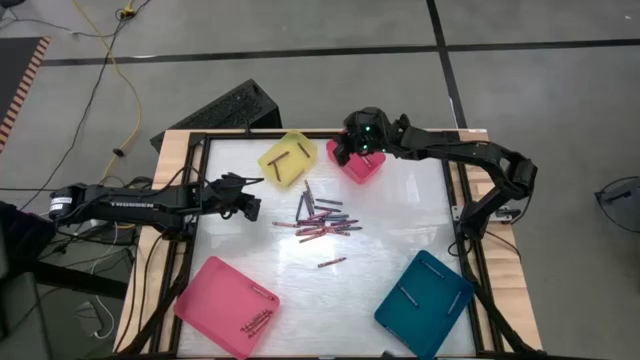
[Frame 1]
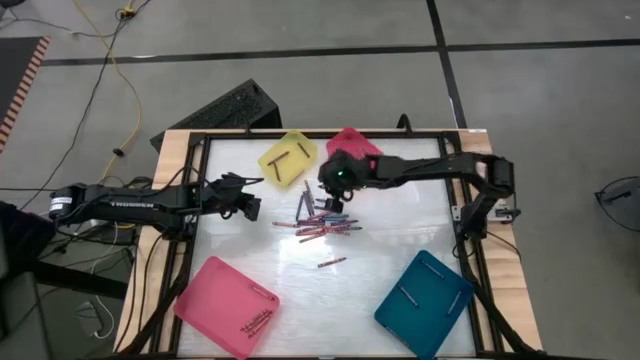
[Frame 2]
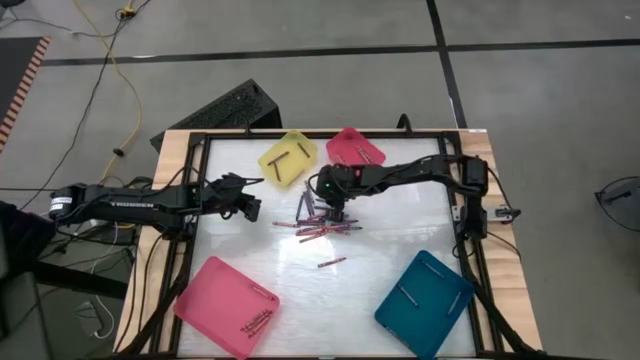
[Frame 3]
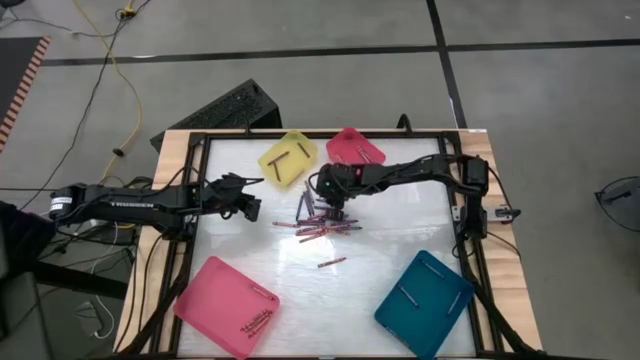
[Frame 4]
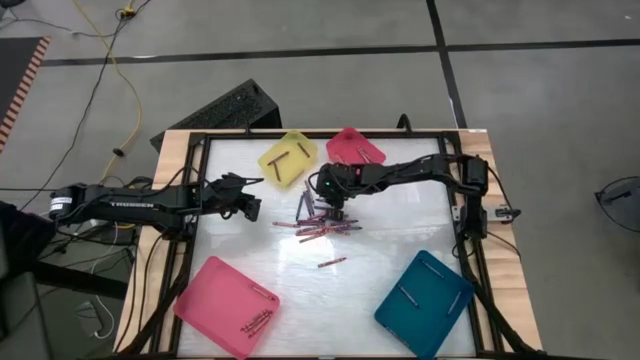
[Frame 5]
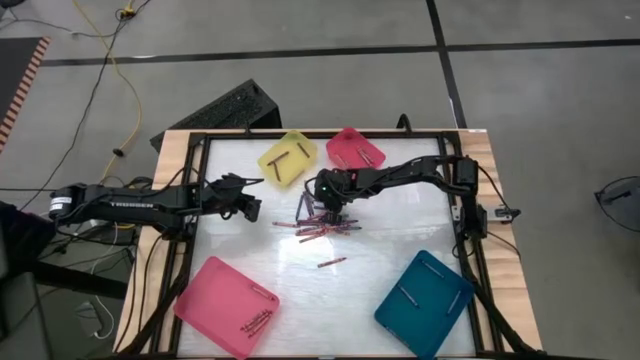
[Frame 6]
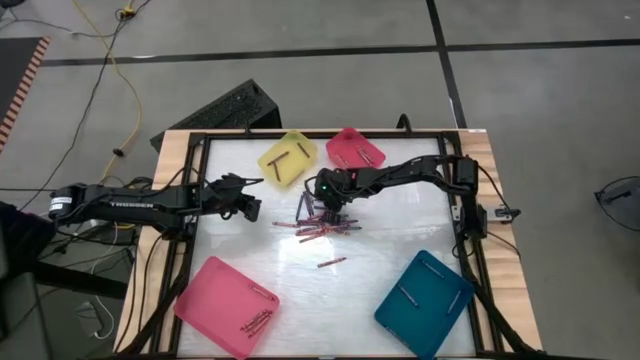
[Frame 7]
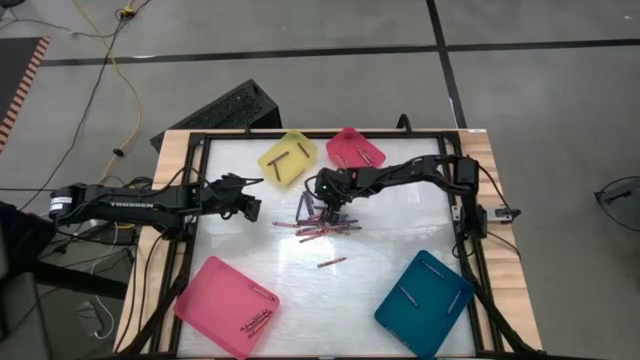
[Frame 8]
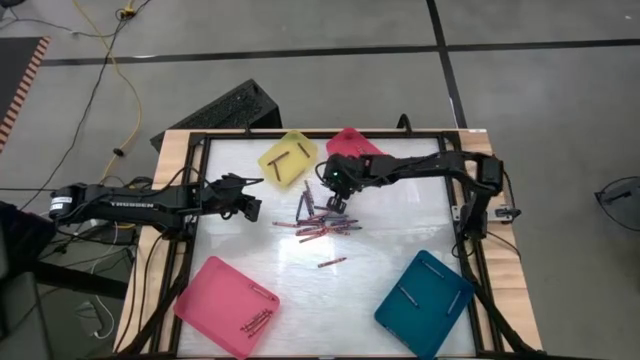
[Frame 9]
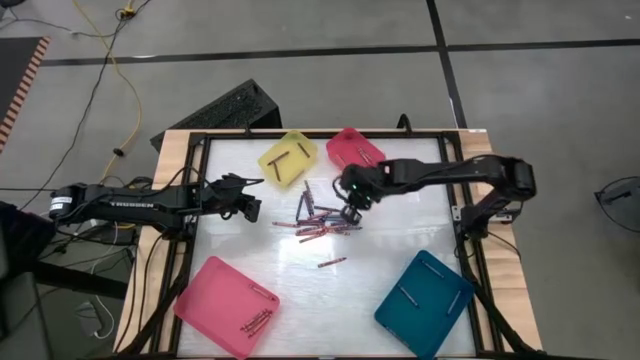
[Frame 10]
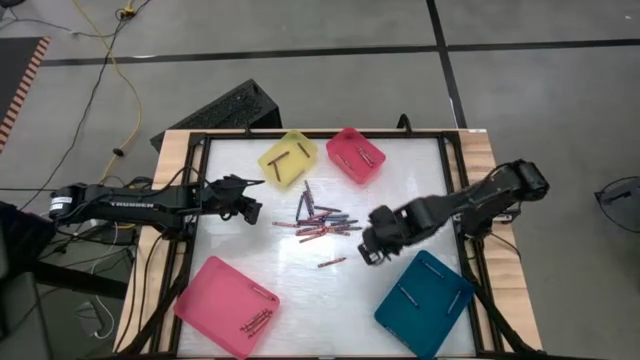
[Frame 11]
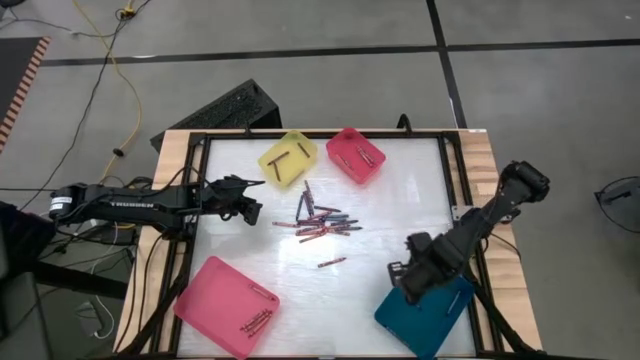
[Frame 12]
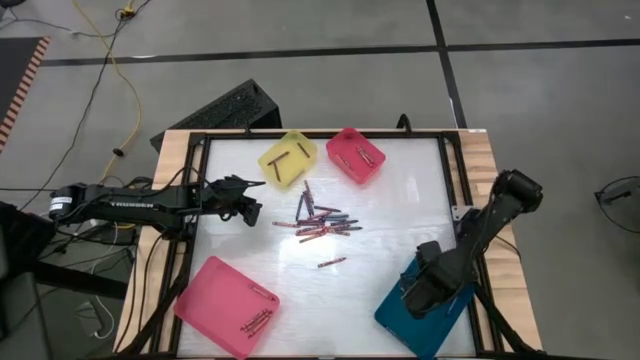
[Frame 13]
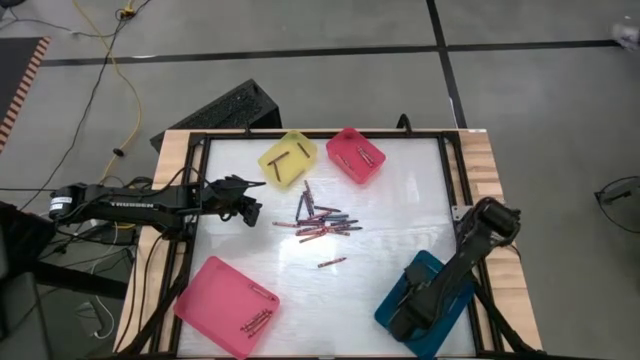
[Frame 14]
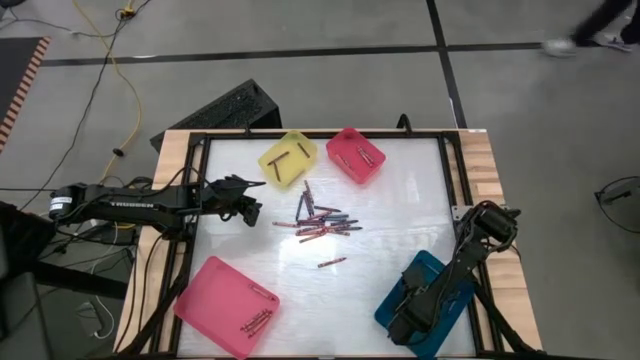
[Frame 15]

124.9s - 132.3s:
Task: Sort crayons
Put the blue crayon into the blue bin

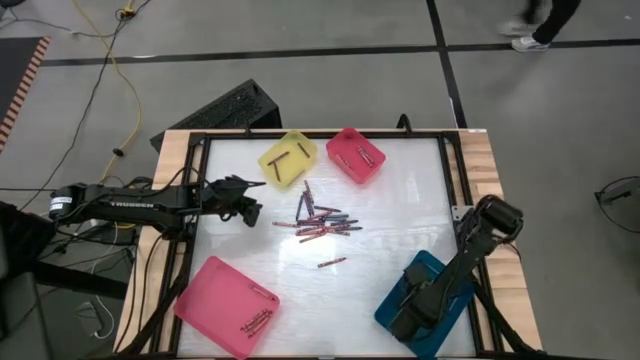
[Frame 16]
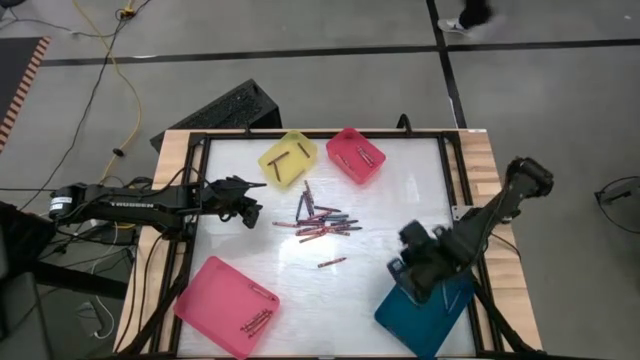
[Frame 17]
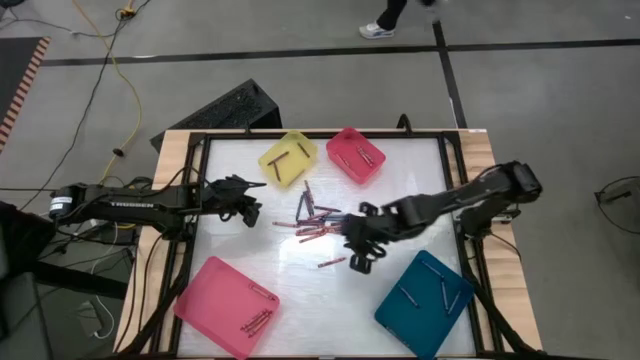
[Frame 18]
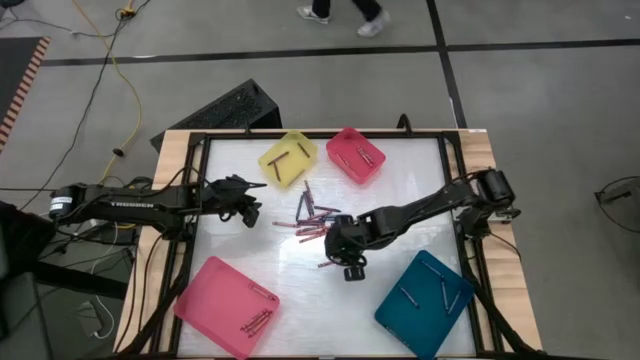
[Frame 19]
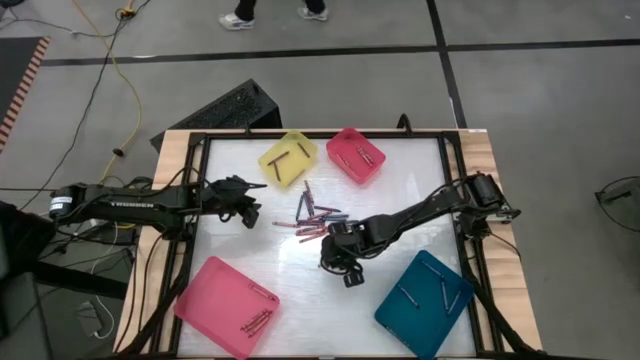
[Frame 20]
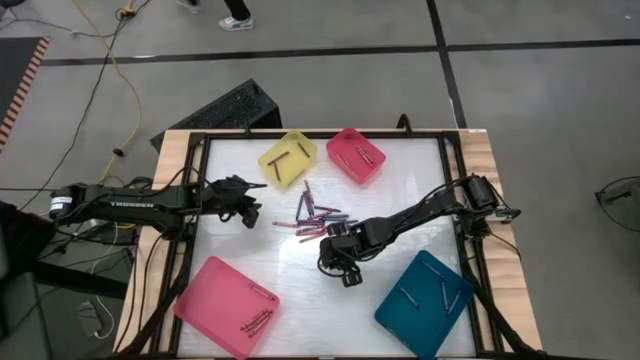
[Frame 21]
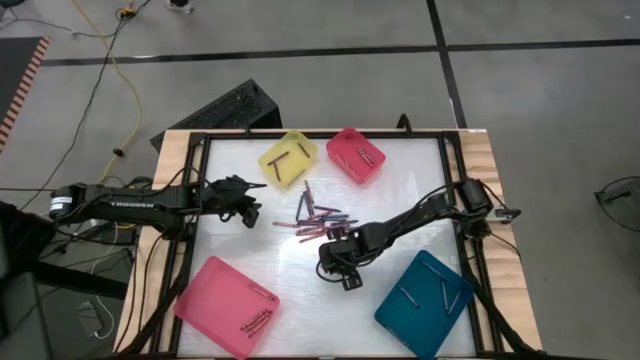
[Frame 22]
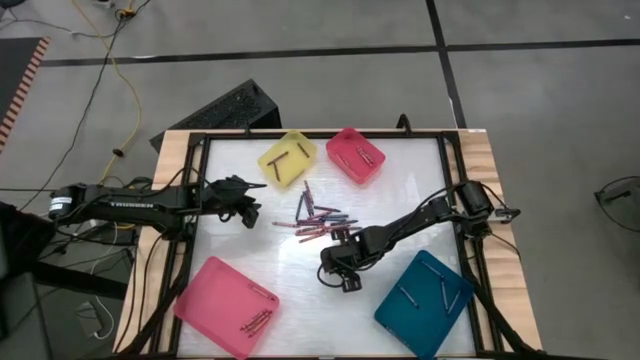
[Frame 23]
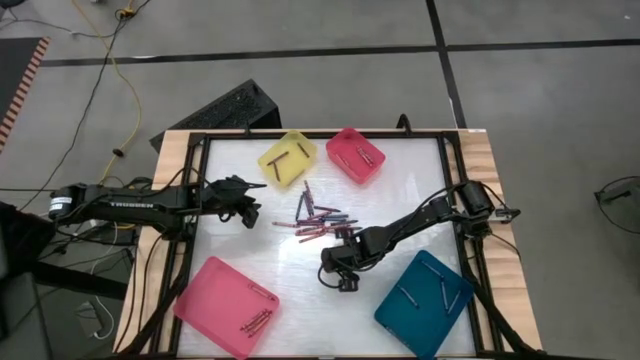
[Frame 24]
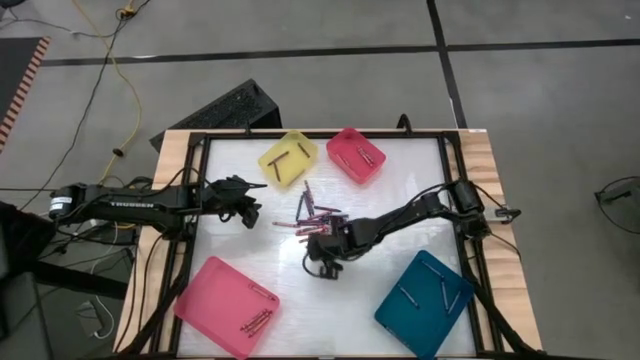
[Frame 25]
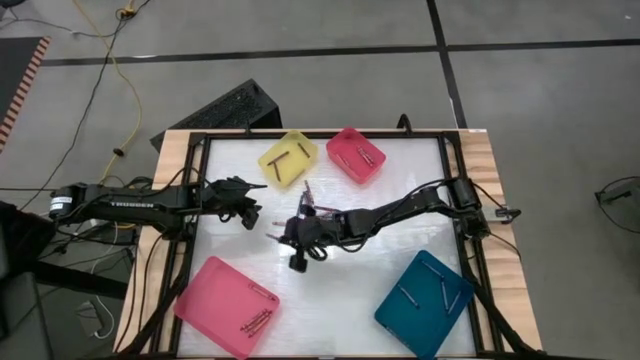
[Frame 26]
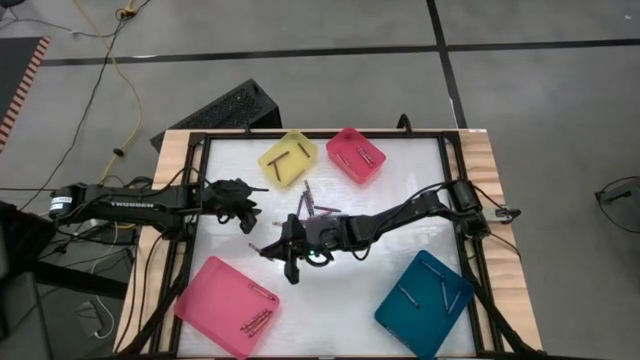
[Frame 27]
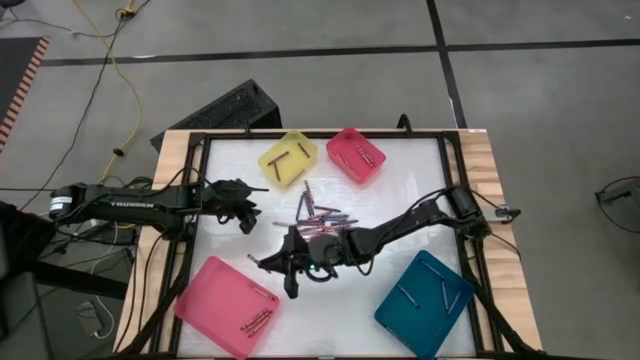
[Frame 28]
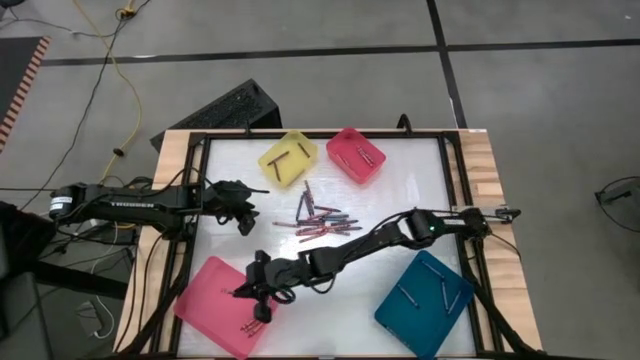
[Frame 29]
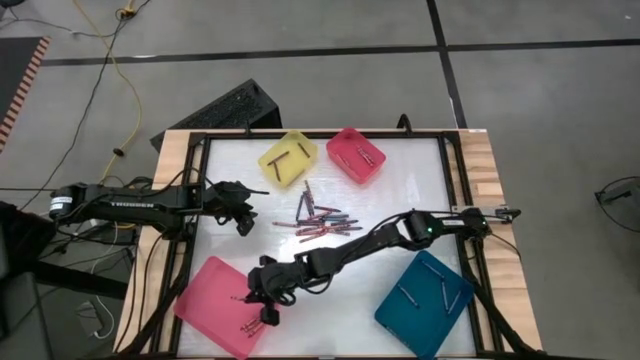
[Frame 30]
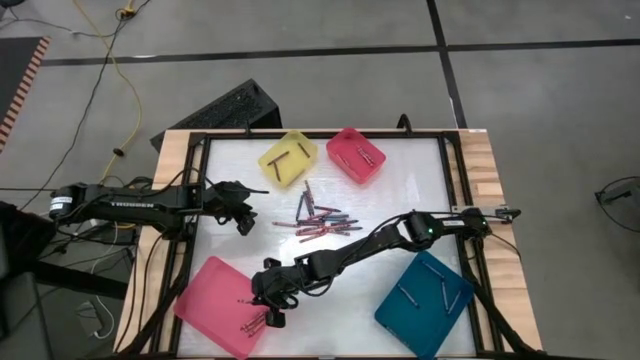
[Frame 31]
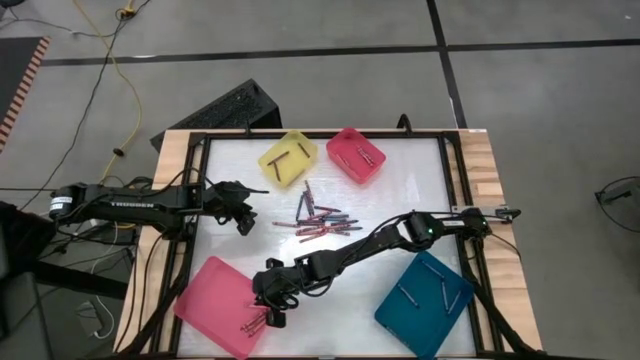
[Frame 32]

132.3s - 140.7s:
Put the red crayon into the pink bin

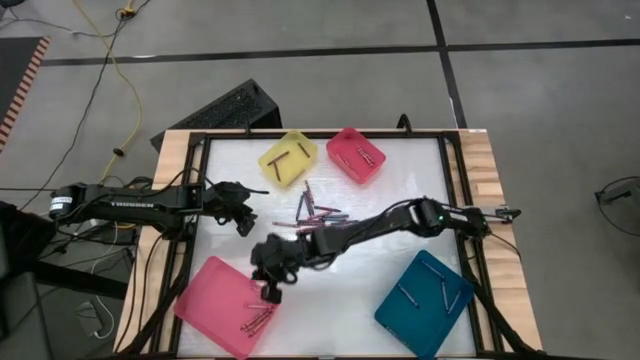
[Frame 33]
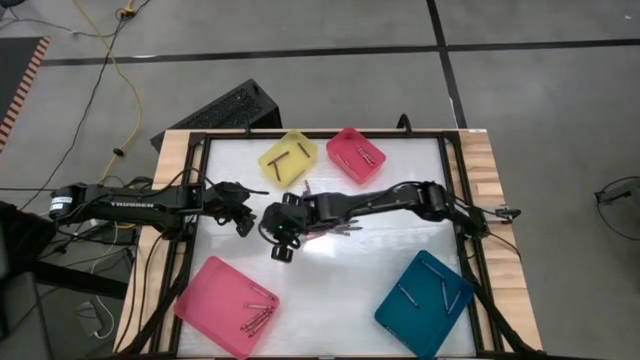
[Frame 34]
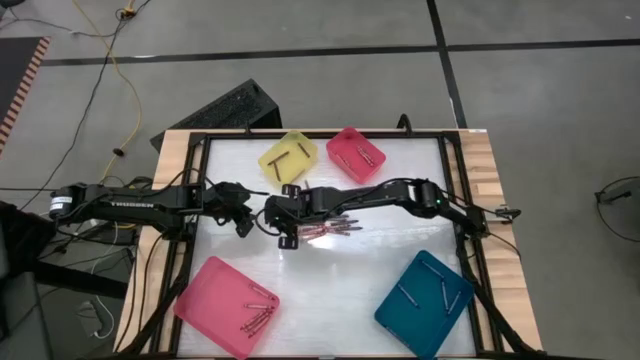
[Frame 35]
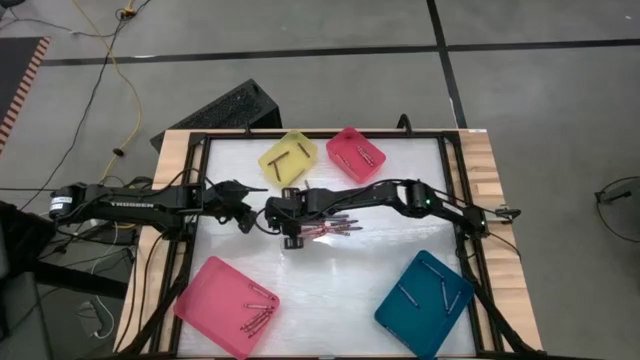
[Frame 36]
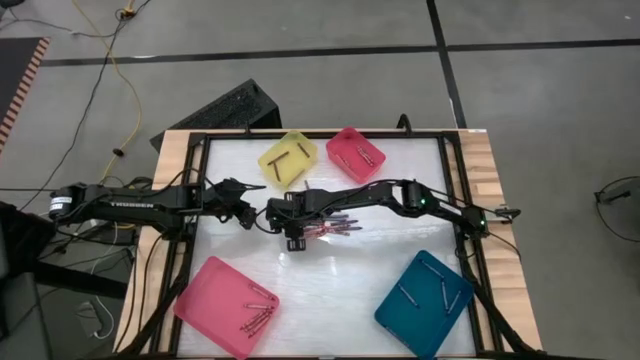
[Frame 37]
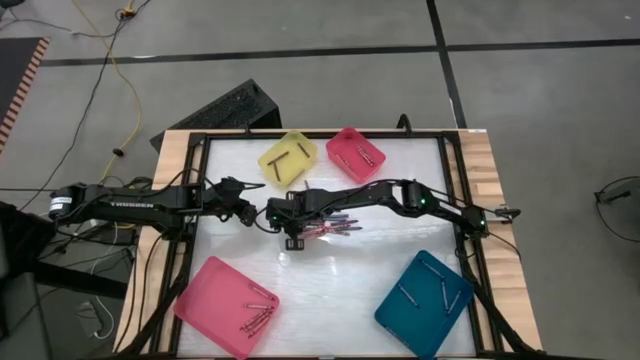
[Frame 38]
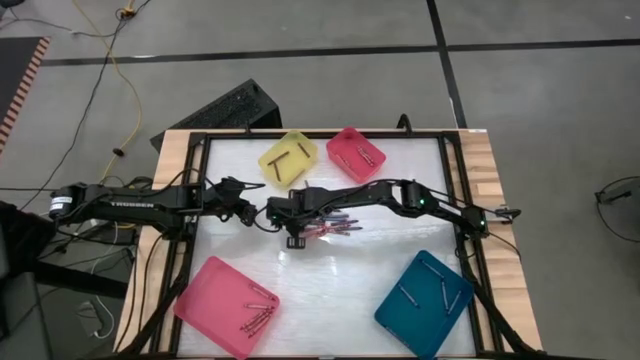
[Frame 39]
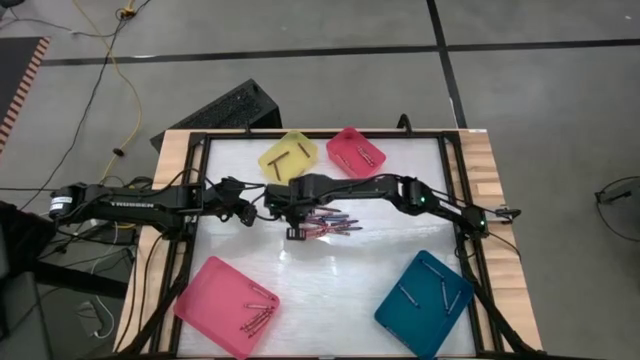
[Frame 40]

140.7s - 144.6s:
Put the pink crayon into the red bin

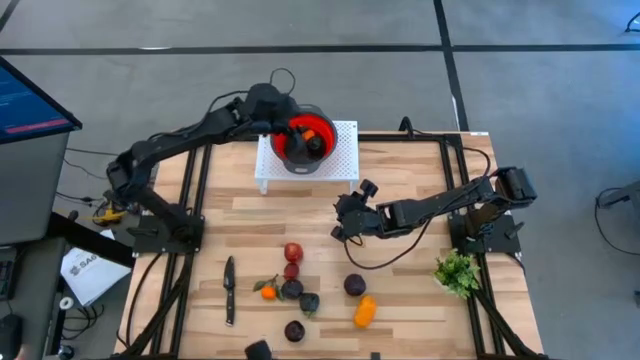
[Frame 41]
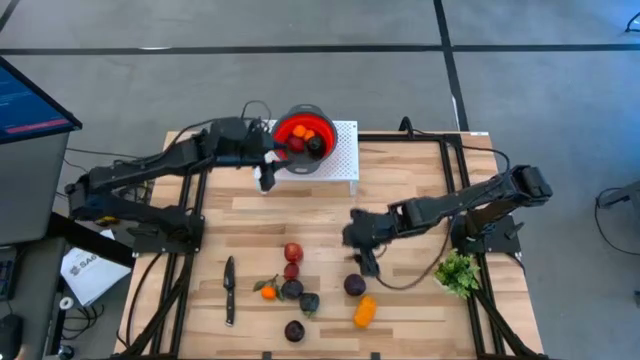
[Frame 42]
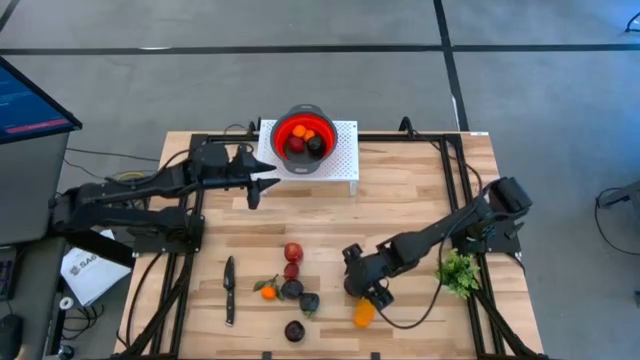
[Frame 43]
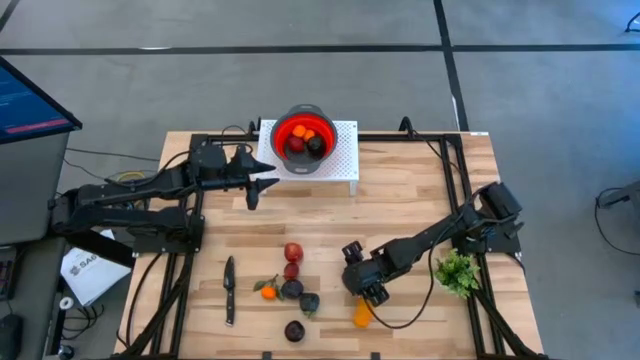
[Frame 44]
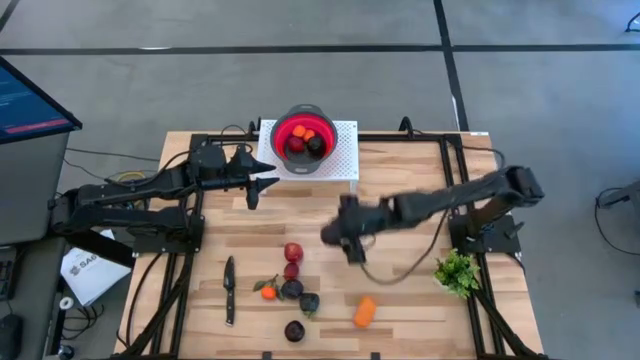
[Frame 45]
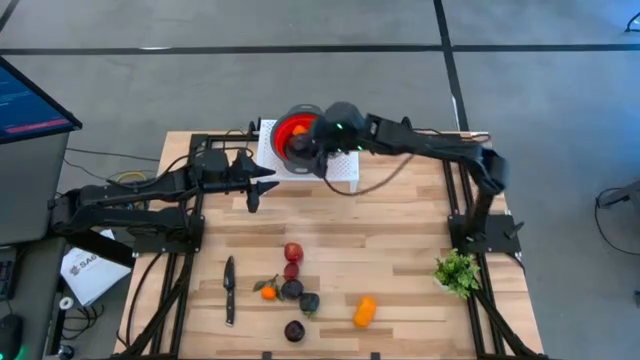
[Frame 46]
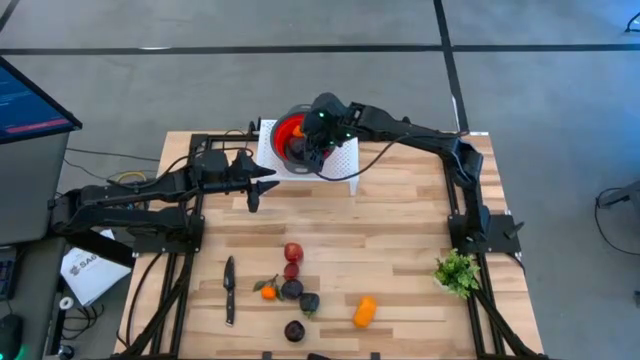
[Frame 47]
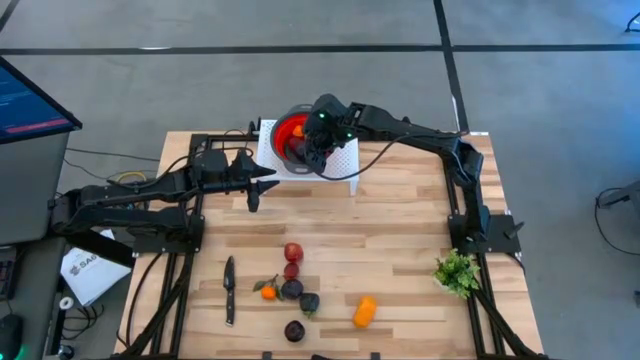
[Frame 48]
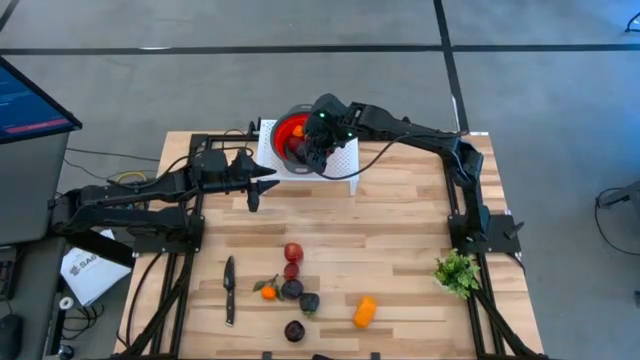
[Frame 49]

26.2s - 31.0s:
Task: Pick & Place Fruit
Put the plum into the red strainer bowl
